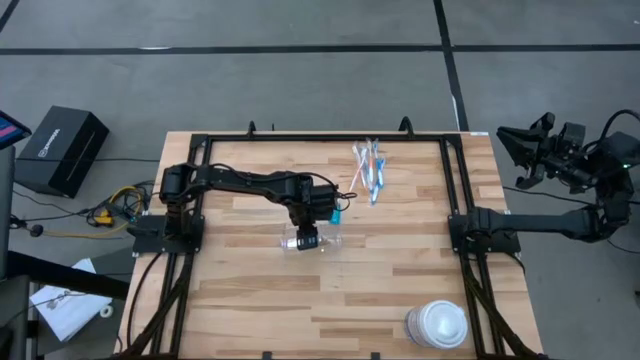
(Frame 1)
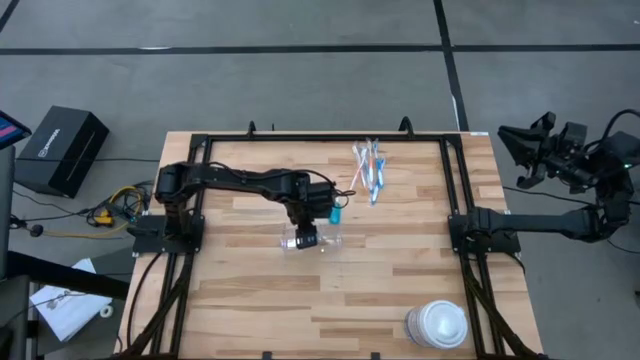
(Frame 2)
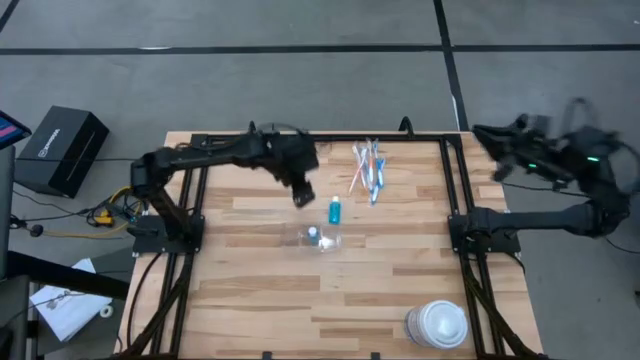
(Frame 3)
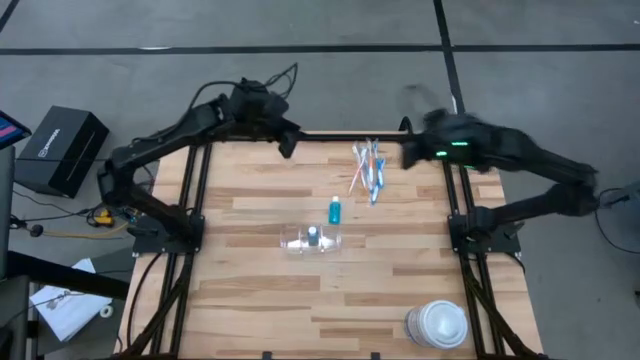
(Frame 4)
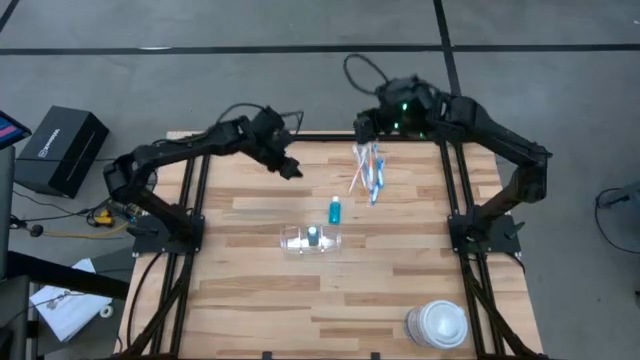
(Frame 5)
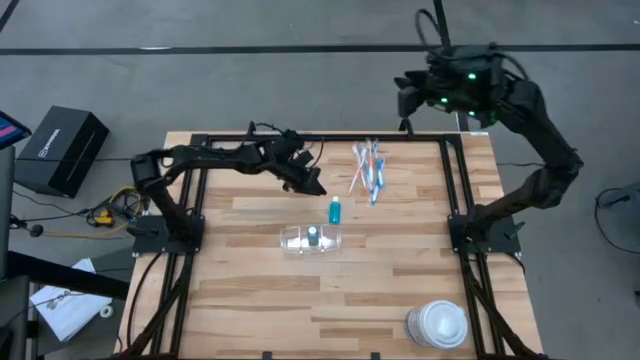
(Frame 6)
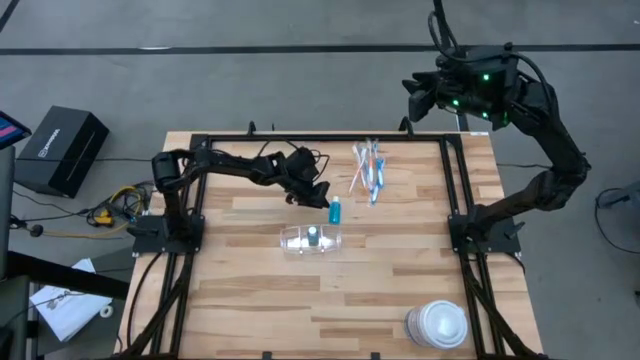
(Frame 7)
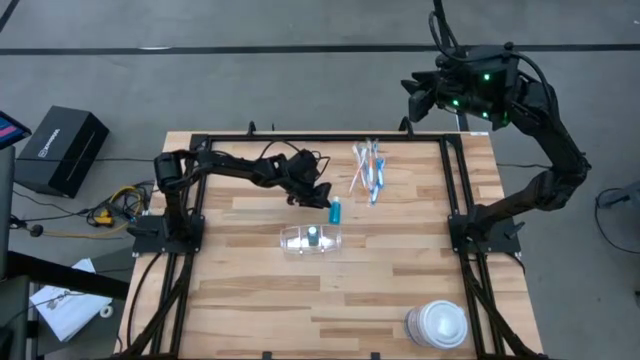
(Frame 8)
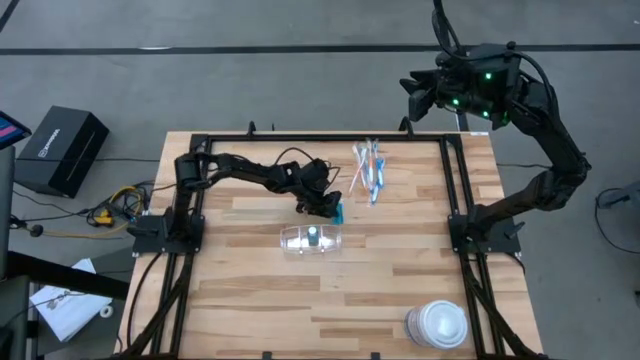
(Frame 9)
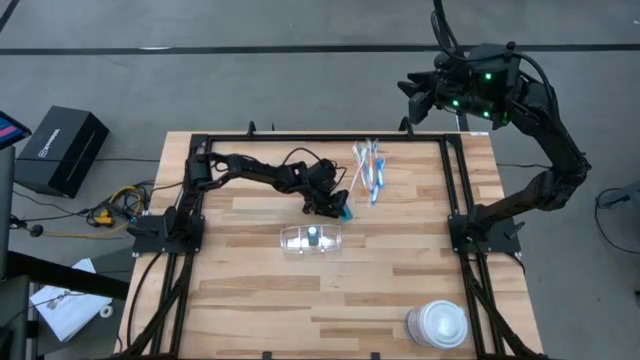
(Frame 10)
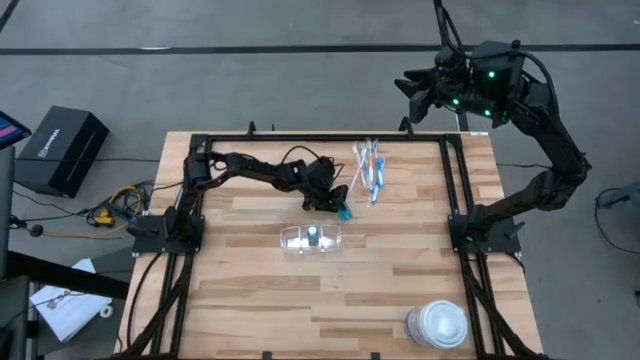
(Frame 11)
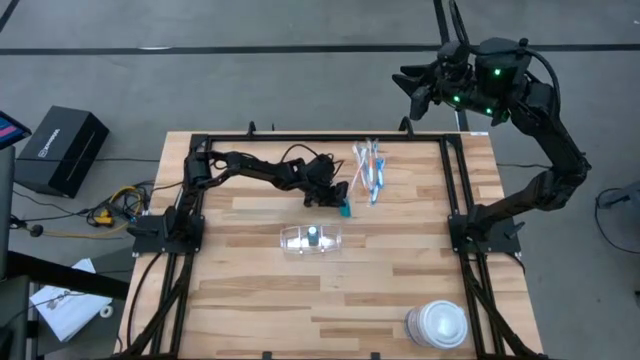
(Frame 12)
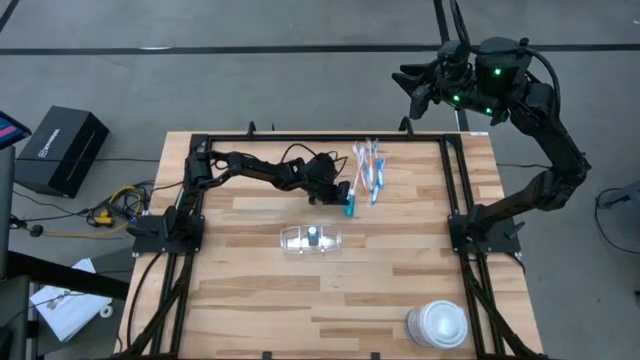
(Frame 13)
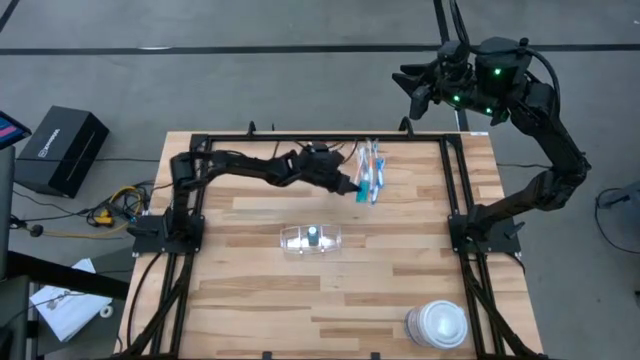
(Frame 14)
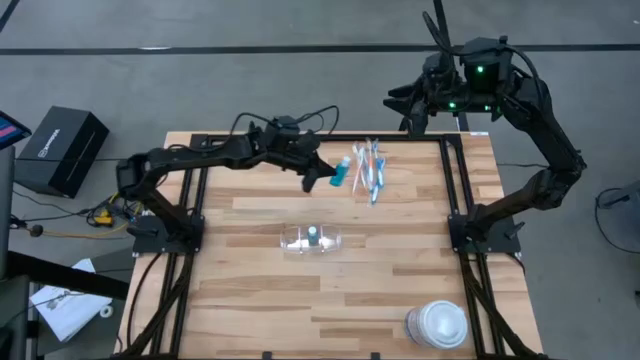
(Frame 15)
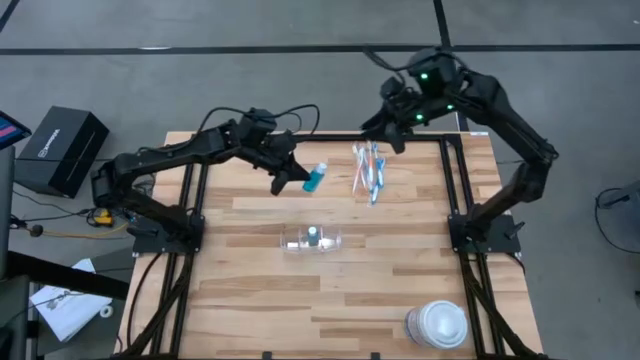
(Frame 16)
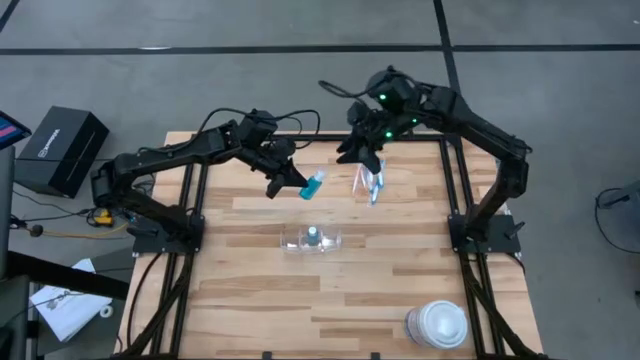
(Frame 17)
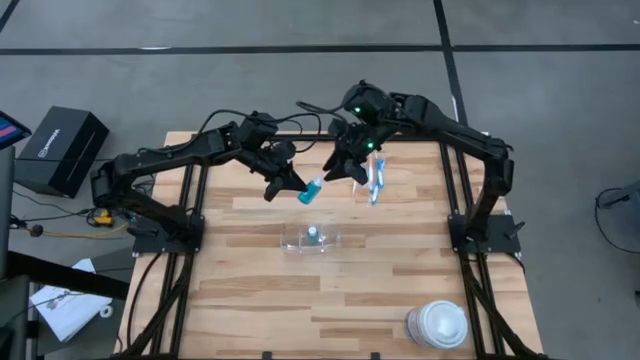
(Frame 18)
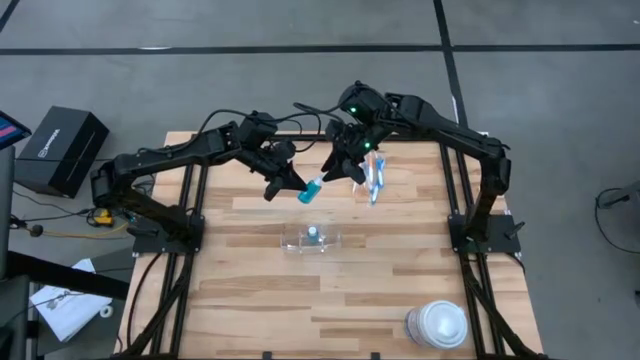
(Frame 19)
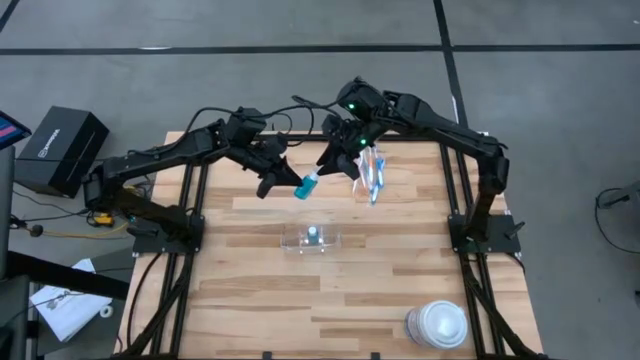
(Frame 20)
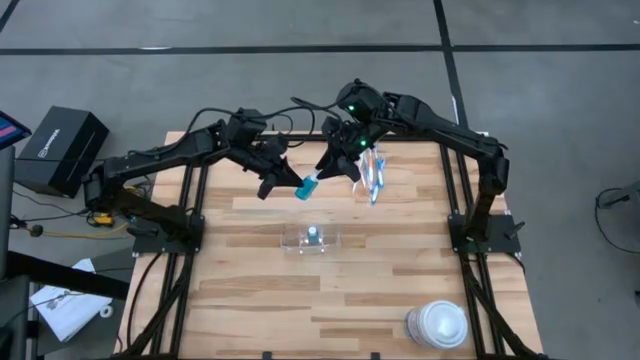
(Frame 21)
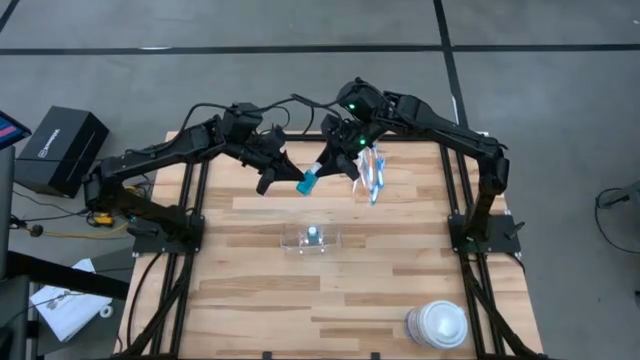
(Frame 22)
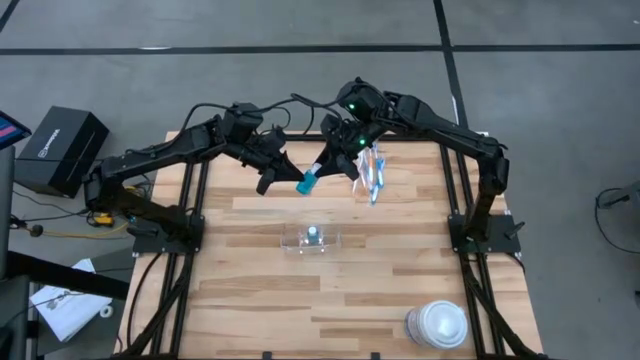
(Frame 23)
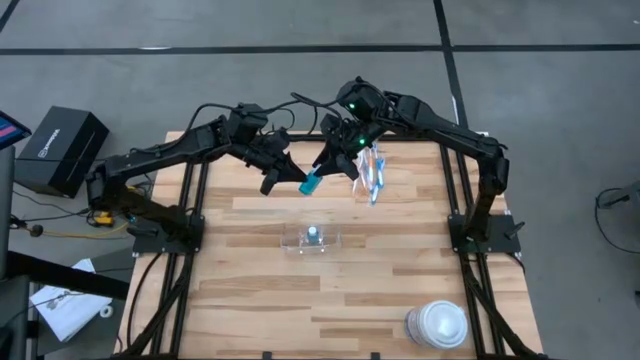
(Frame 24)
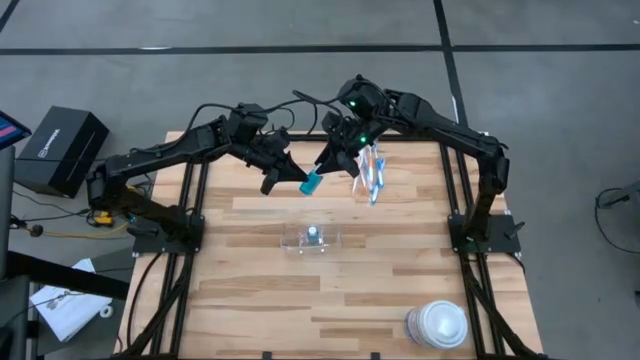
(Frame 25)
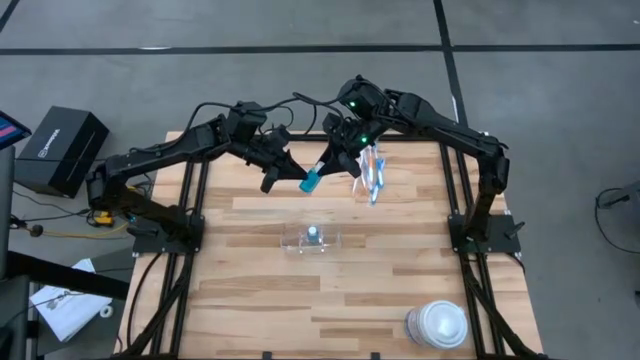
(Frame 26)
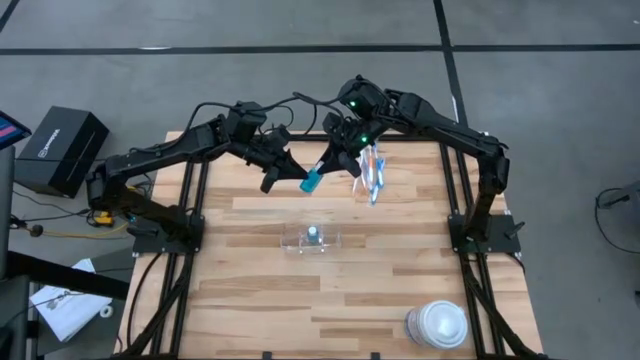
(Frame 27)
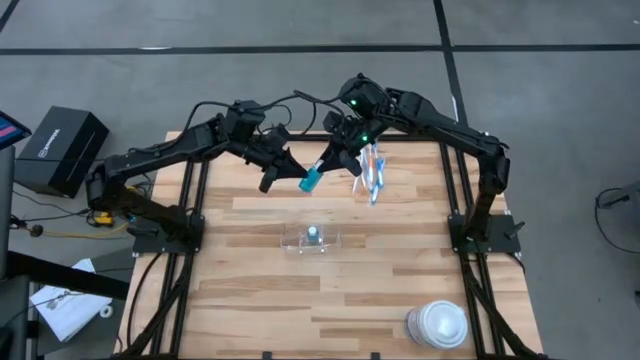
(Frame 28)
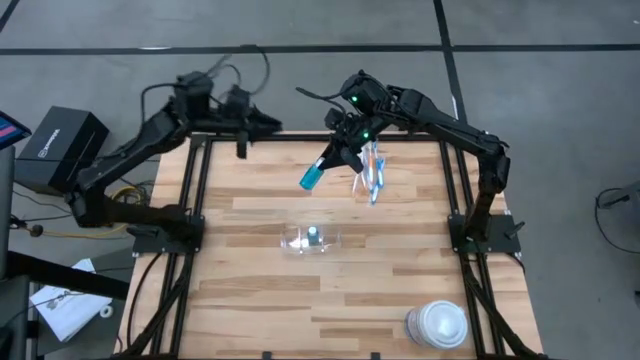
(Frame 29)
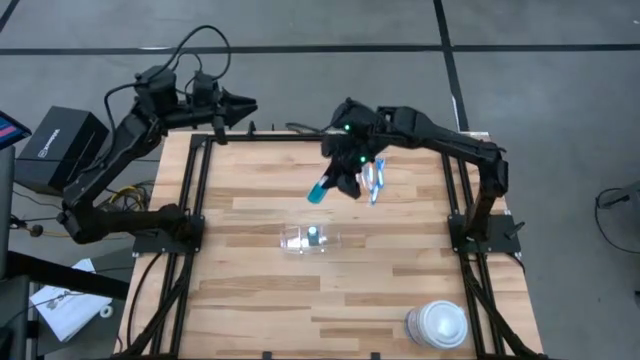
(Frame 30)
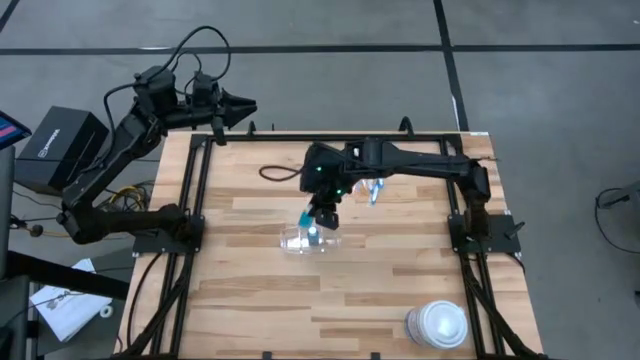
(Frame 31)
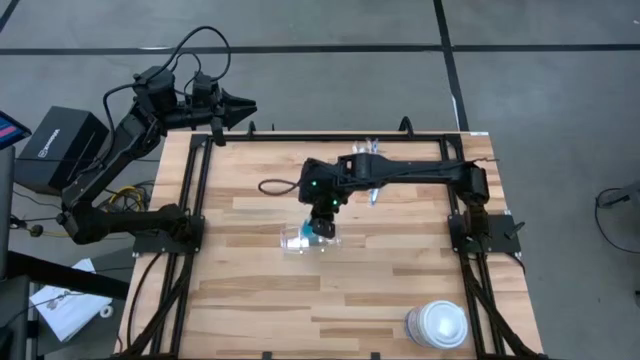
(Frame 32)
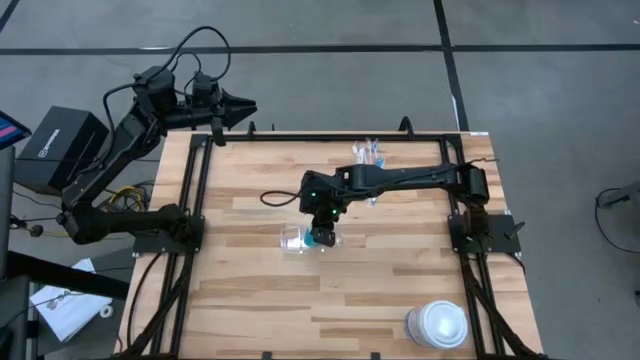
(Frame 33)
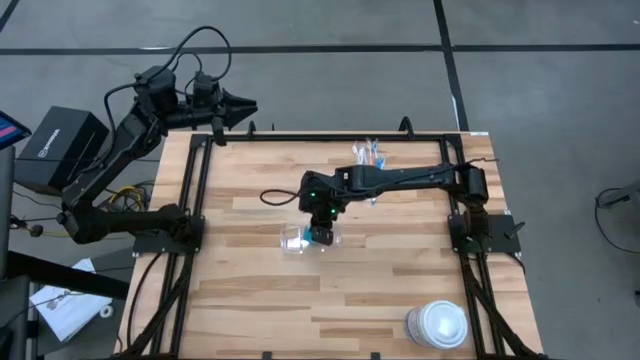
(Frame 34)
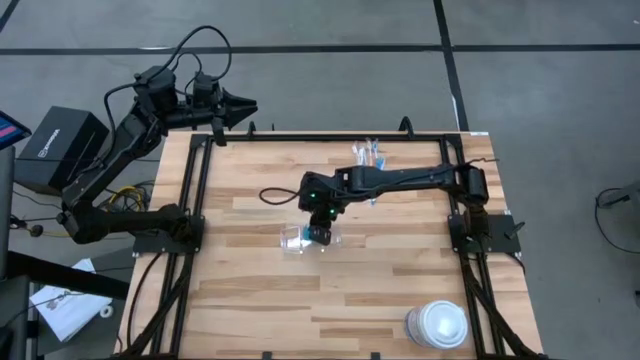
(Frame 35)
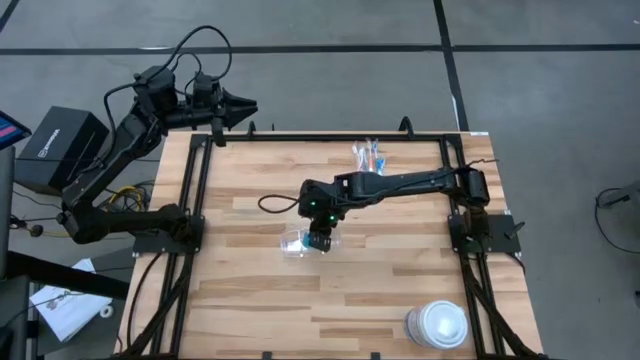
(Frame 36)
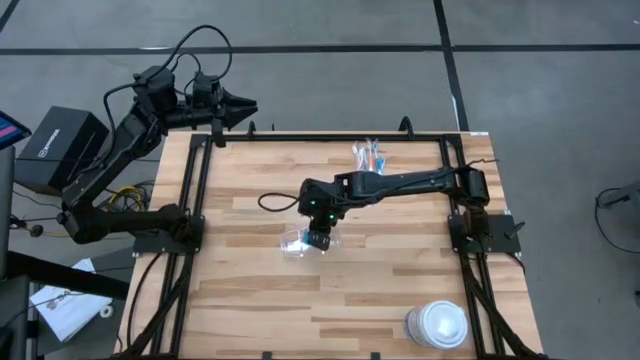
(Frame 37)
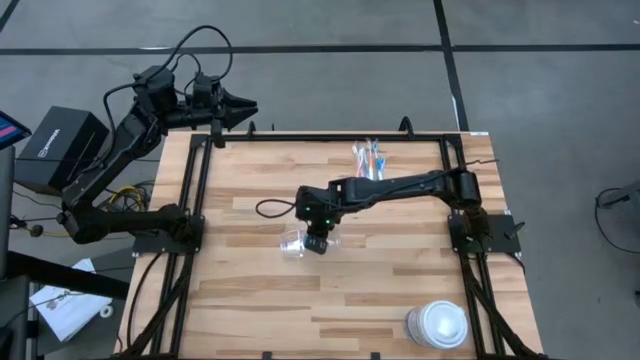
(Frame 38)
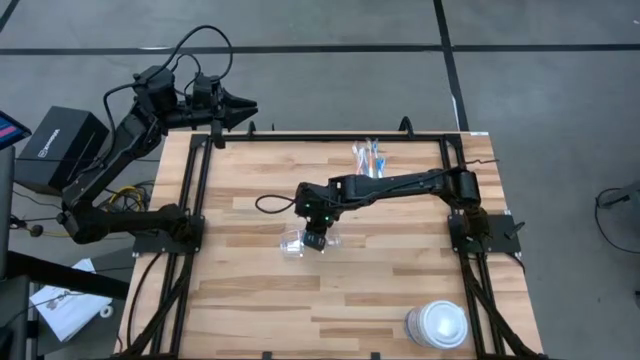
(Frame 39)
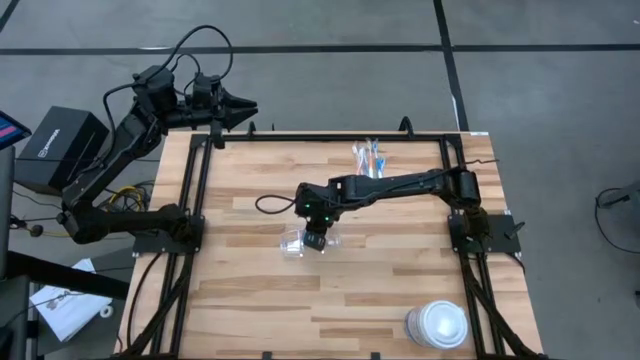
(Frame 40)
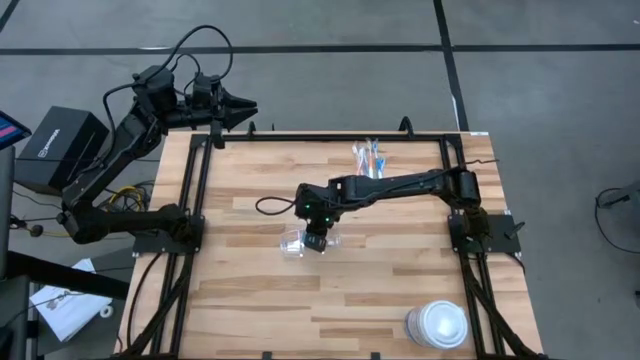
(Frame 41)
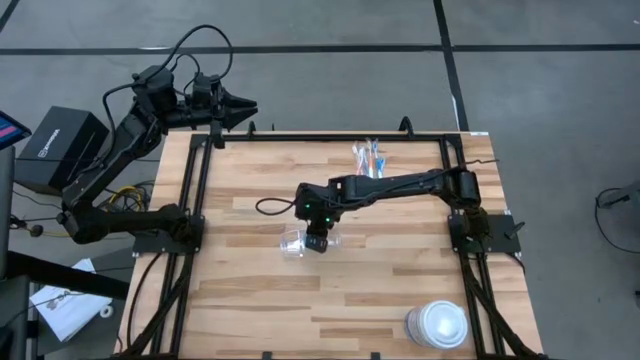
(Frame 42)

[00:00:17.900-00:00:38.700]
Task: Pick & Place toothbrushing station
Put the blue mouthwash into the transparent organizer

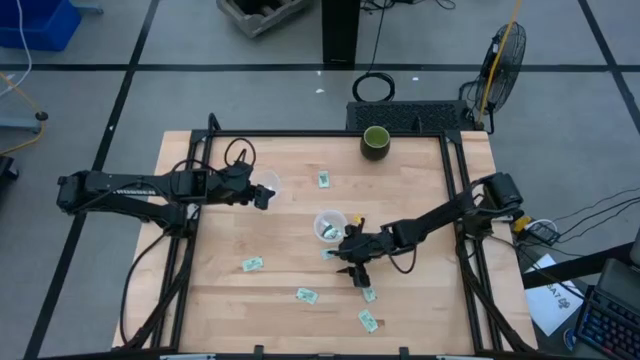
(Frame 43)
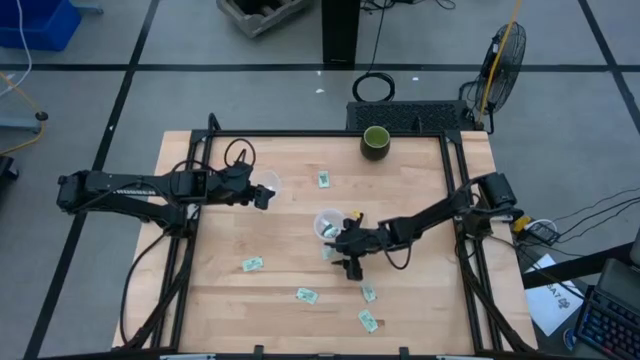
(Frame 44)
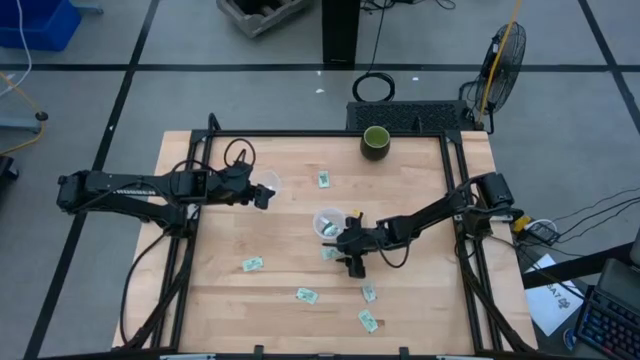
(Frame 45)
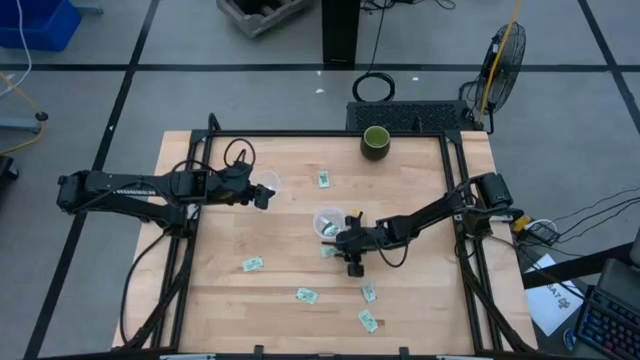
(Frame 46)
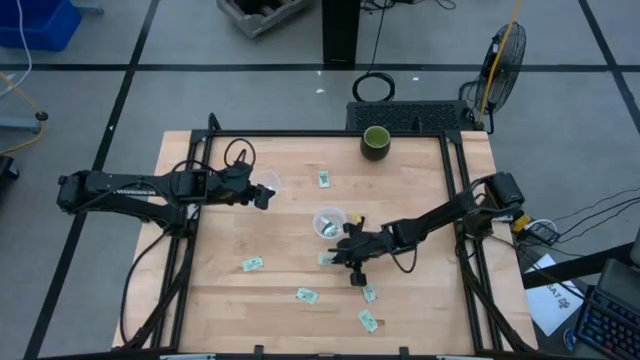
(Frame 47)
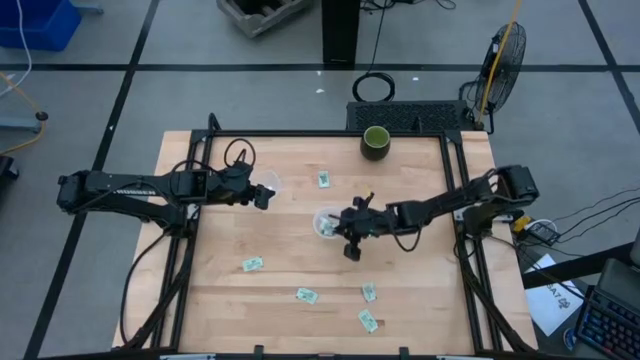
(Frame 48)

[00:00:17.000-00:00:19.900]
Task: Pick and place items into bin
Put the stevia packet into the right transparent bin
